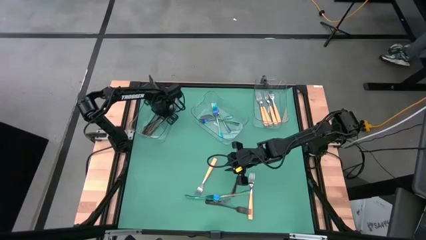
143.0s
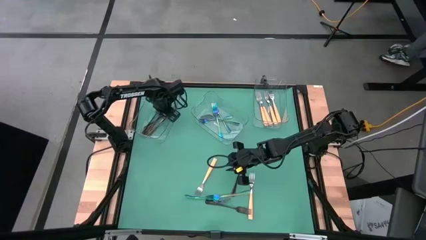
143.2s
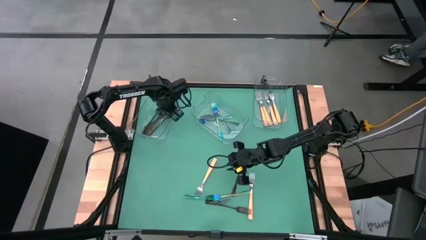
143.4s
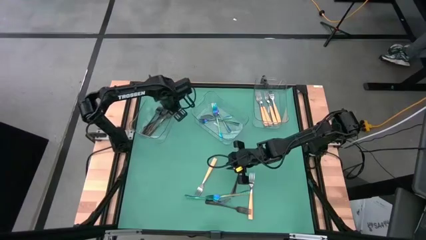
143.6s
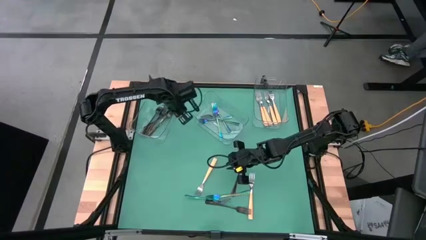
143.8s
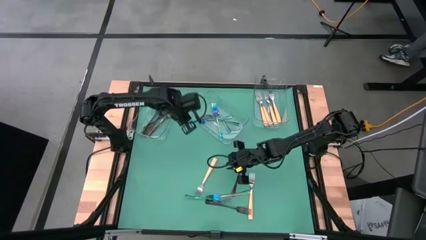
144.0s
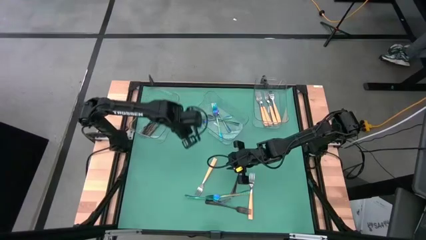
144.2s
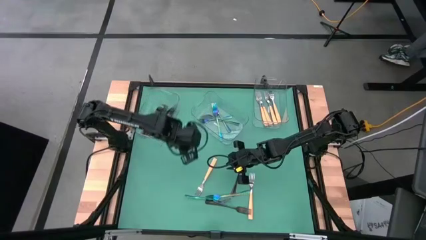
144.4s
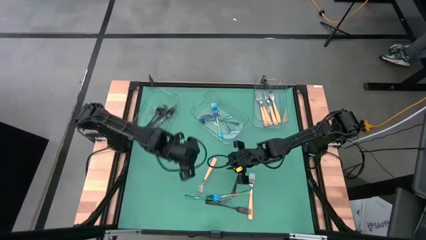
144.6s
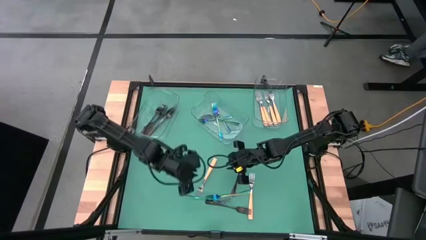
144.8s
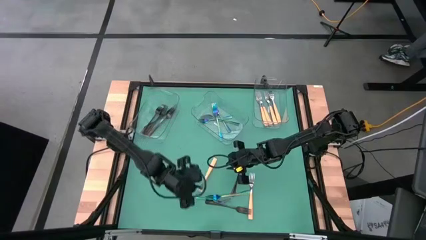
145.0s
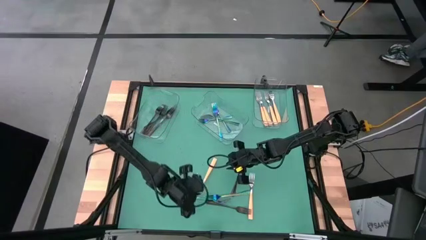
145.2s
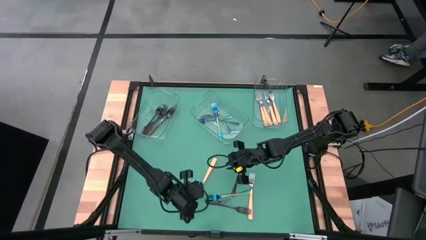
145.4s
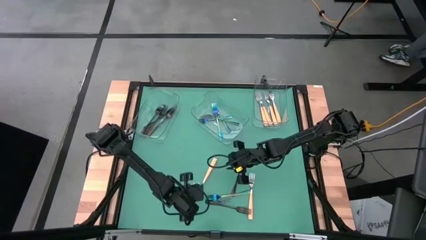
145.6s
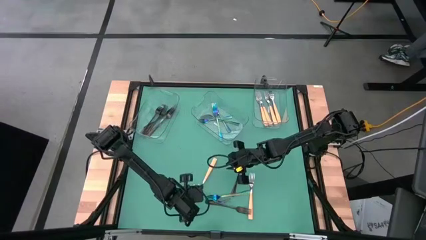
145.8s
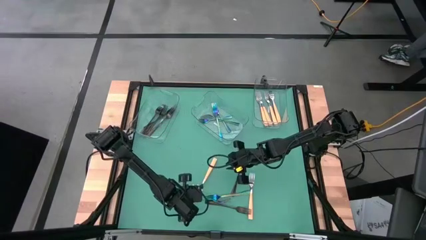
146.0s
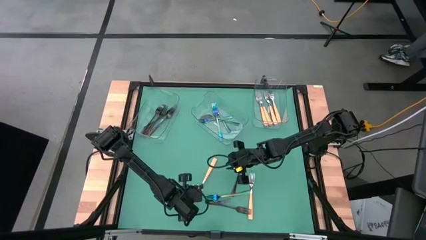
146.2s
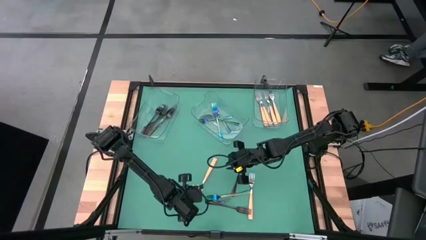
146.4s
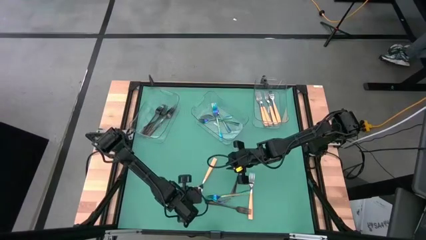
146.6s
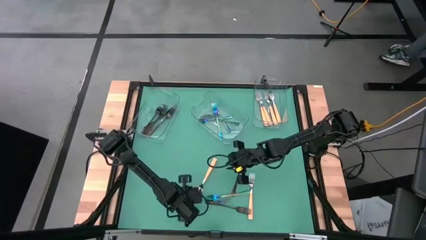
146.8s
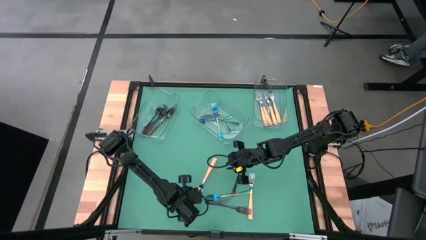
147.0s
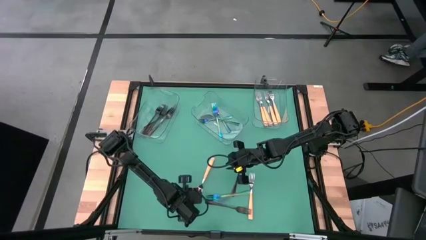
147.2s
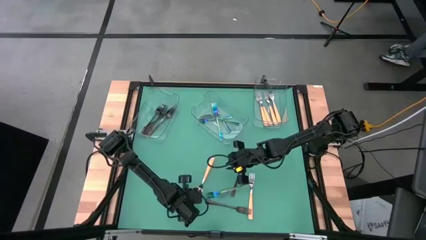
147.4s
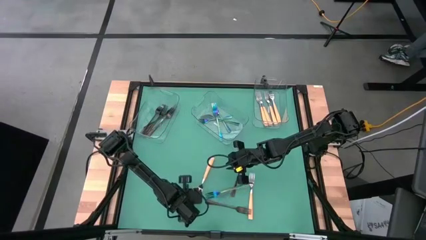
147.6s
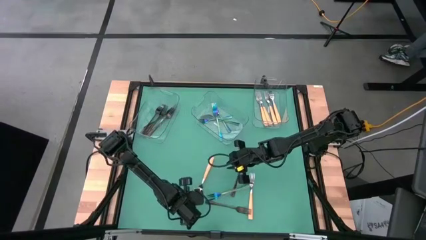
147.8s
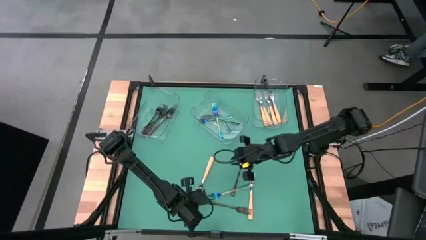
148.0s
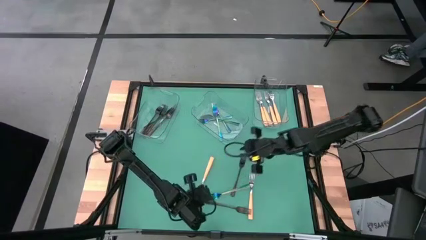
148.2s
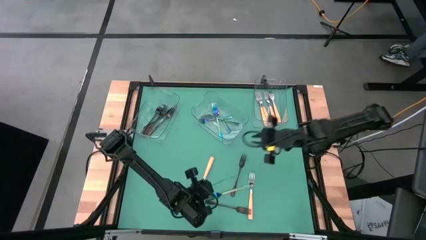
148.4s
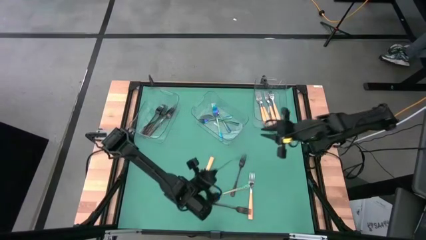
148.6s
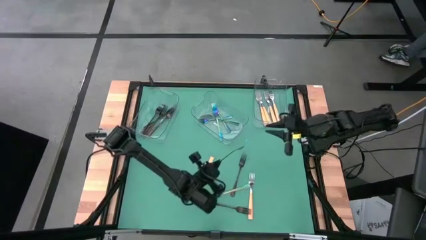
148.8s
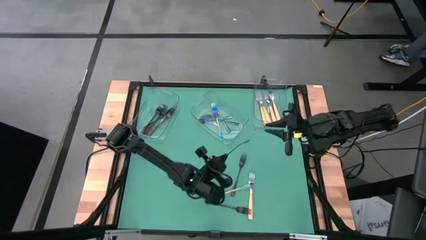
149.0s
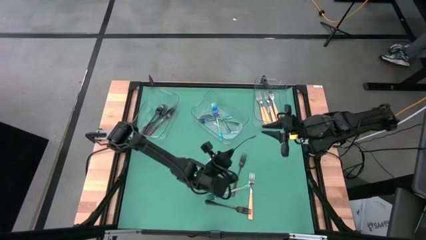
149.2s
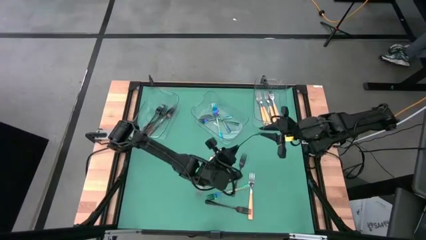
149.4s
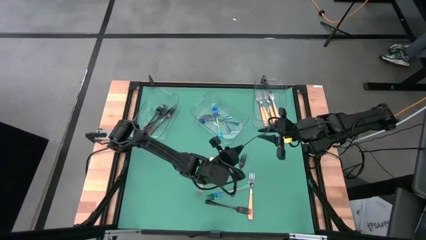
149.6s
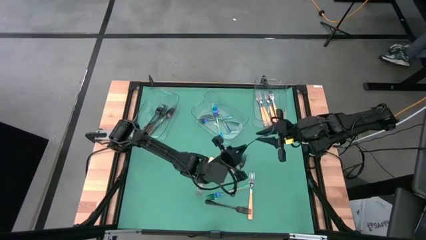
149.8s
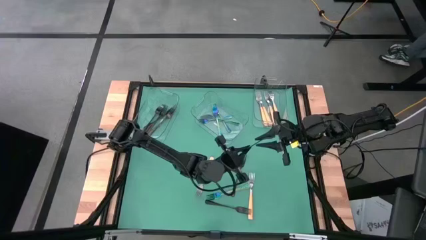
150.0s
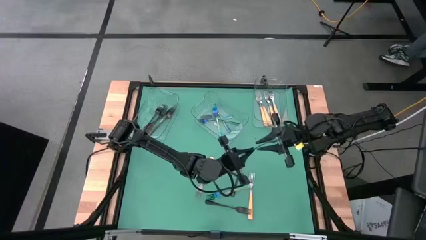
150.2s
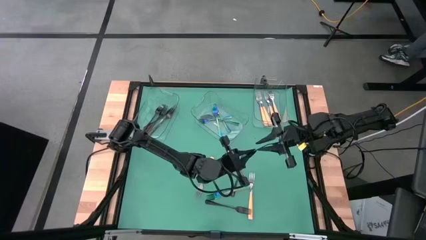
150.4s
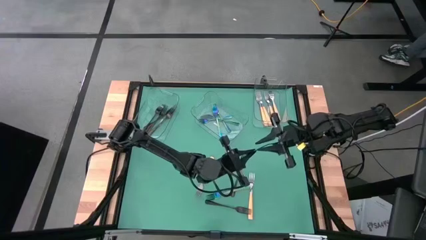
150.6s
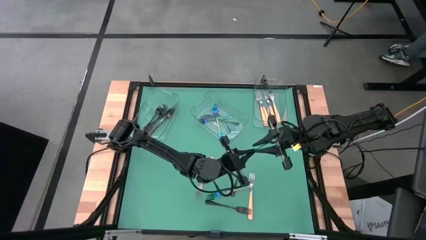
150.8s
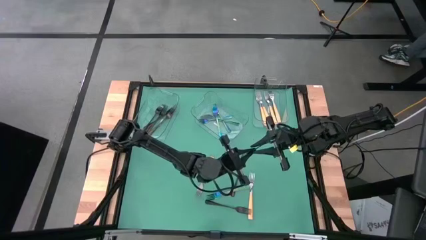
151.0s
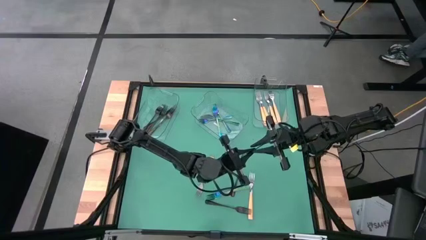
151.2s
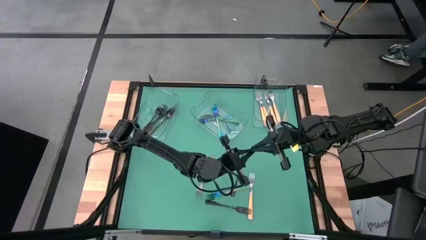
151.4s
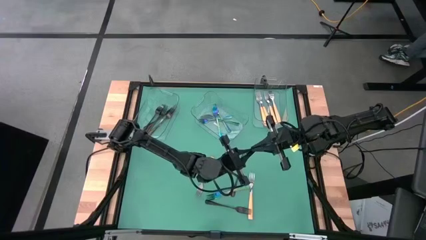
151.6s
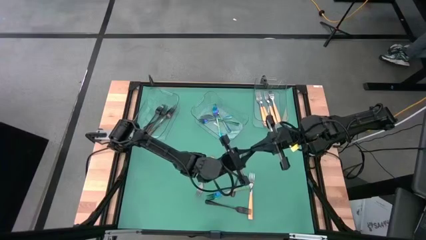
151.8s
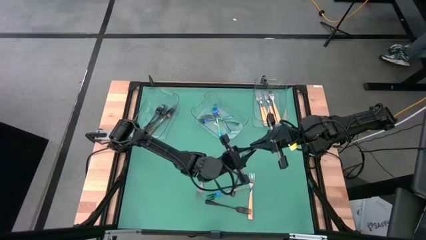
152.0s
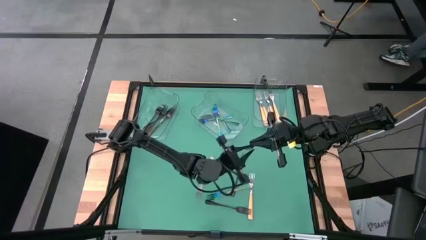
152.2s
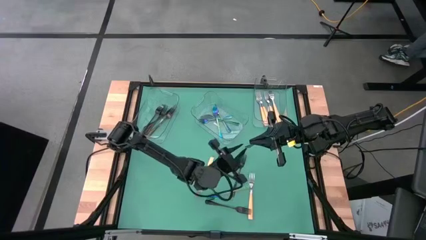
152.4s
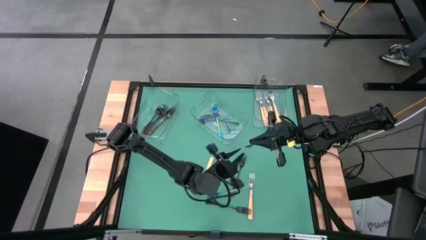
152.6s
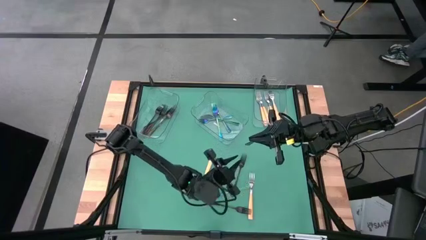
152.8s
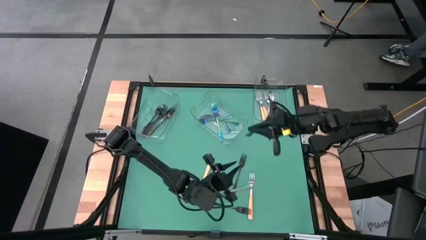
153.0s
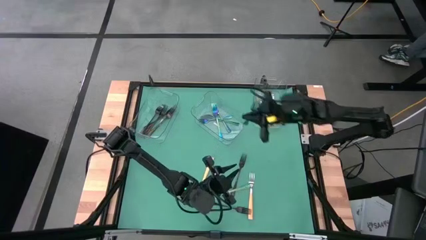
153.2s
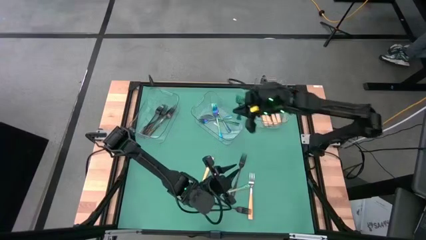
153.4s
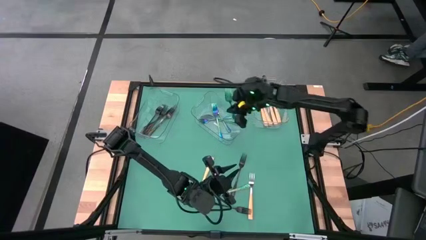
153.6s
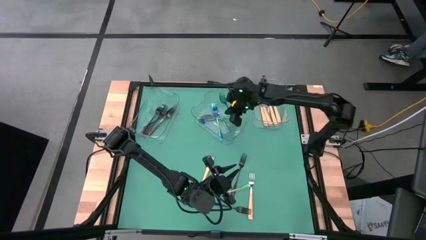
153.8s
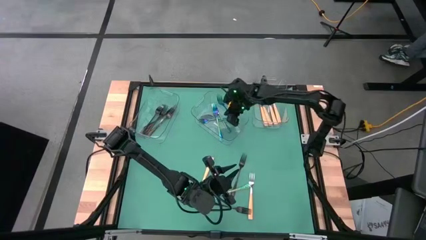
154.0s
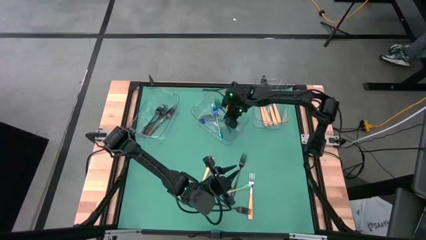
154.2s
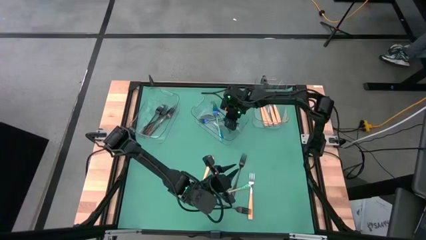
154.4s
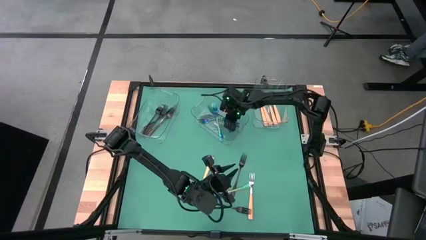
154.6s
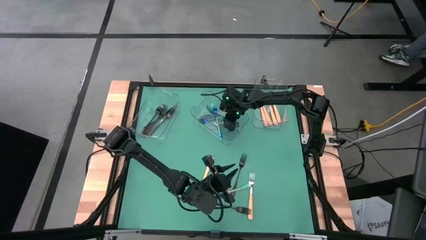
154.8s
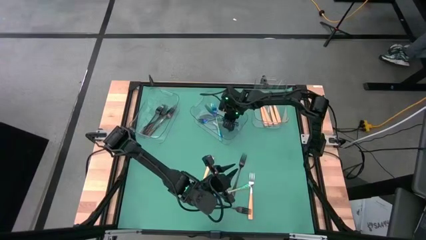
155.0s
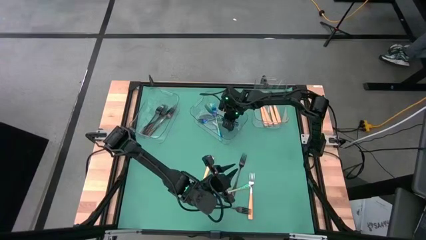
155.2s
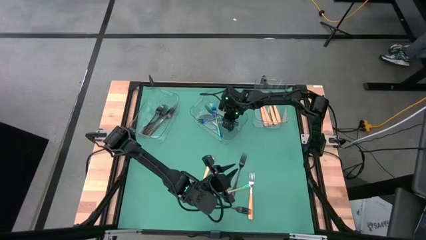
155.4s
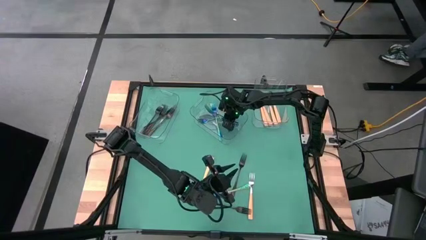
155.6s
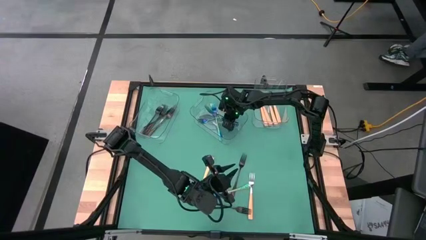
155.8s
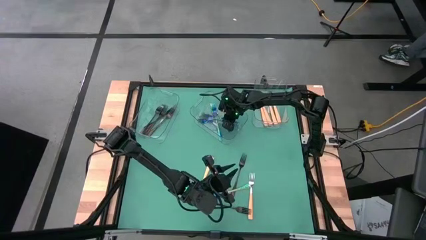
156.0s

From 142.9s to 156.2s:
Task: Sort silverware by color (type)
Put the blue fork into the center transparent bin

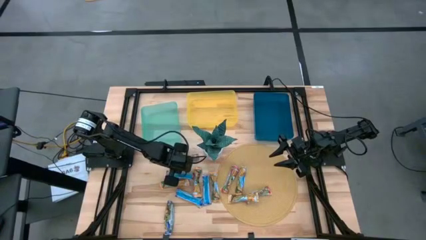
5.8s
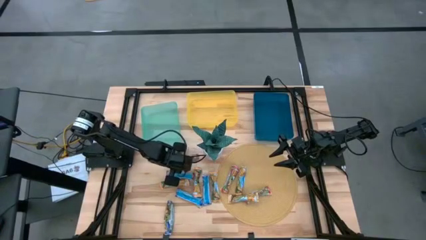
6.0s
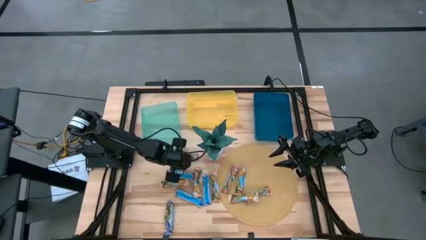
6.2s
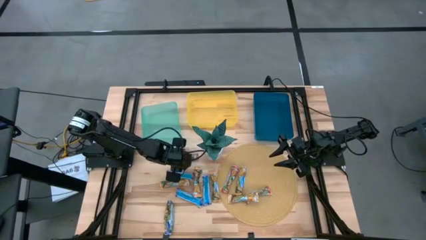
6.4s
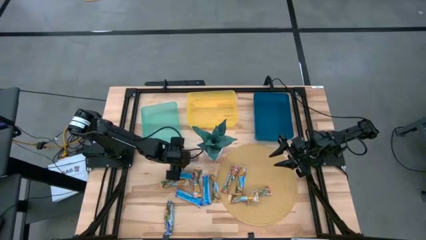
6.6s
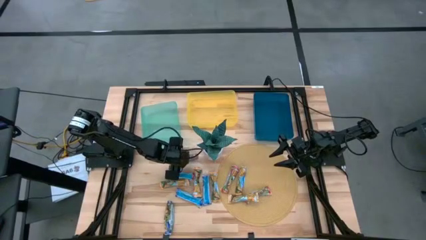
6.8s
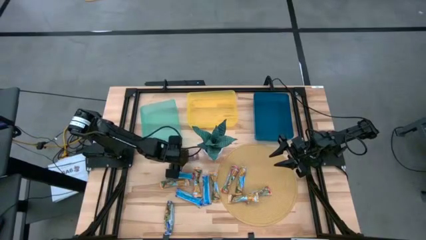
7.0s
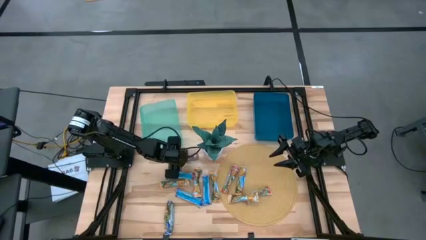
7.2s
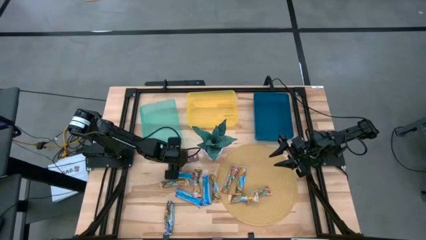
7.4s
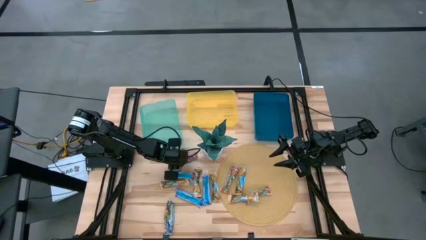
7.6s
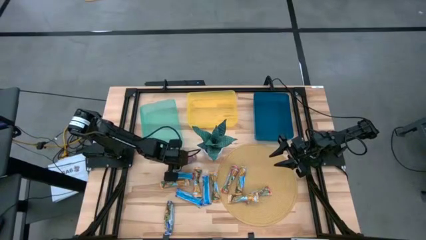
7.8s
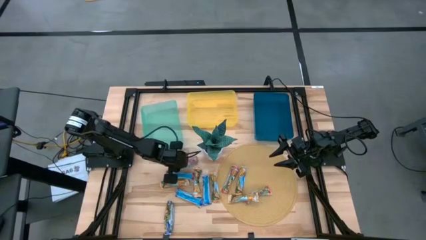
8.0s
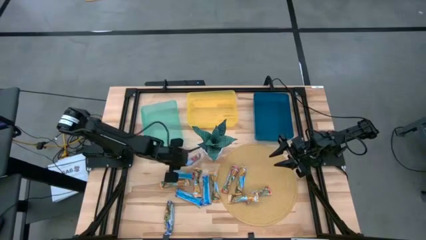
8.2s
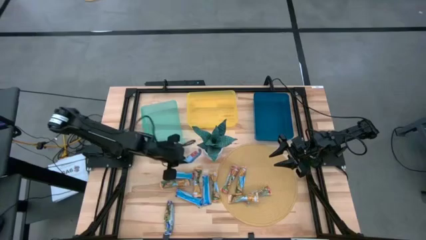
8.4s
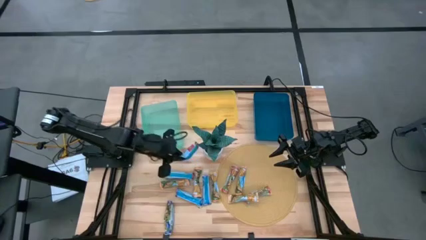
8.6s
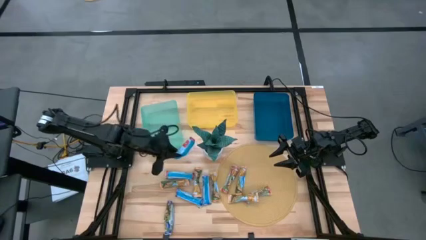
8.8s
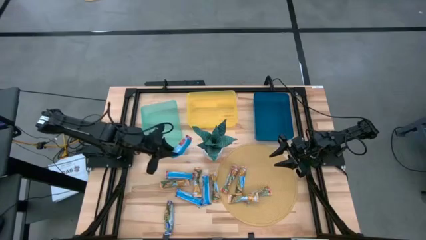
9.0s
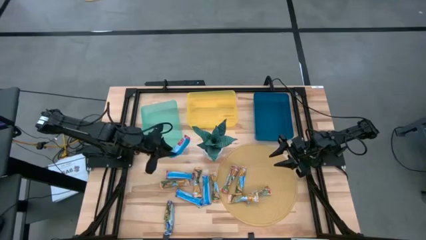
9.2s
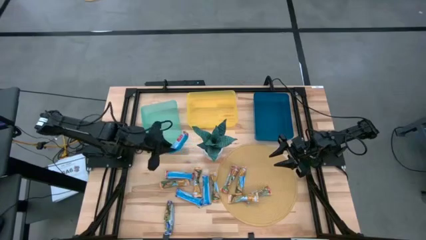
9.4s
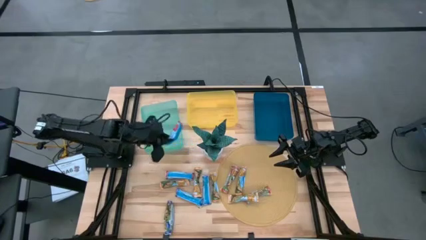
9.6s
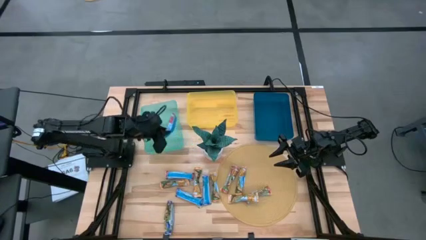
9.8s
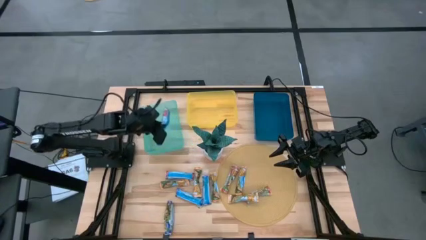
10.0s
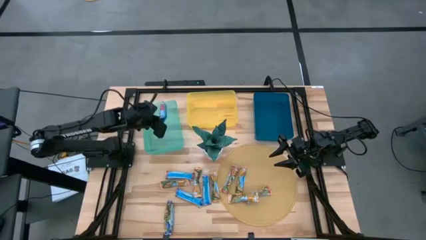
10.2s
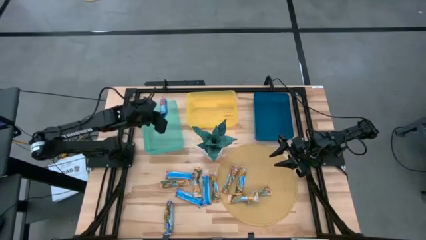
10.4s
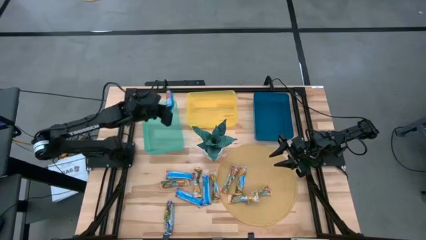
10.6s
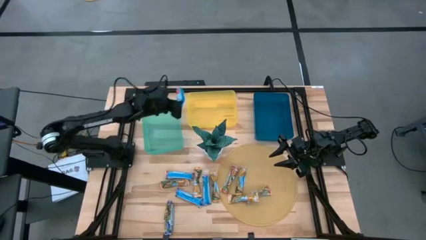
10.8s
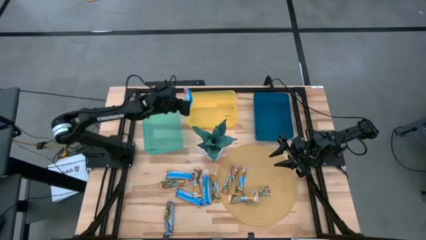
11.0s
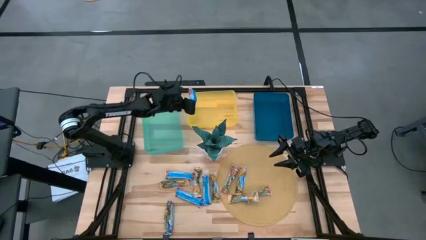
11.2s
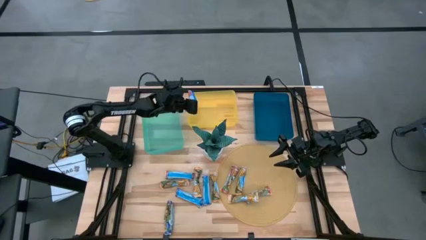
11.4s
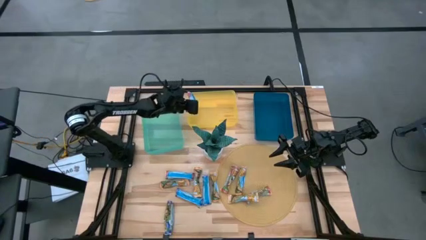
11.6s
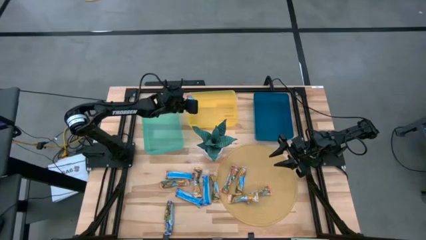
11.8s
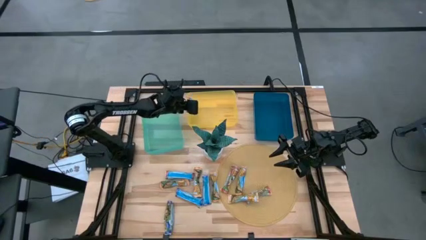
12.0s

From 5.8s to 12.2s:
Task: Pick and place Granola Bars by type
Put the red granola bar into the yellow bin
